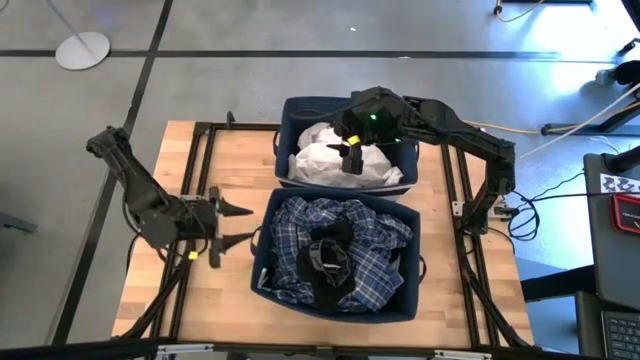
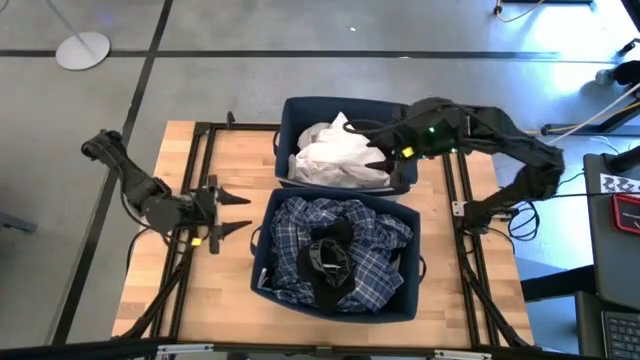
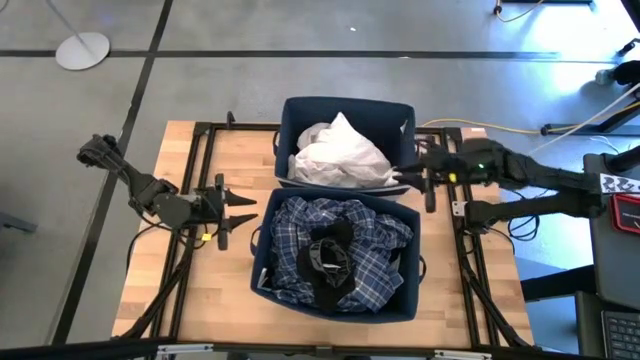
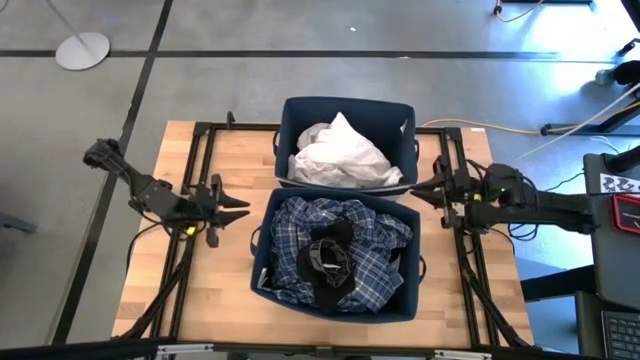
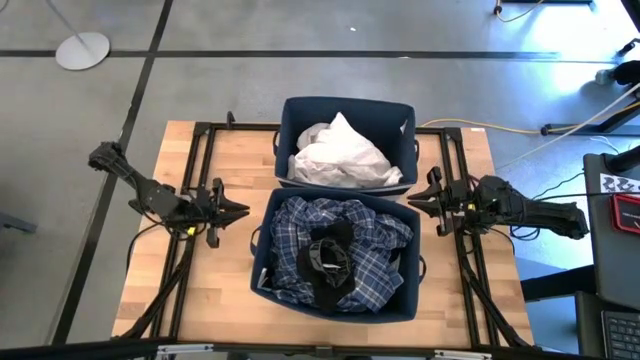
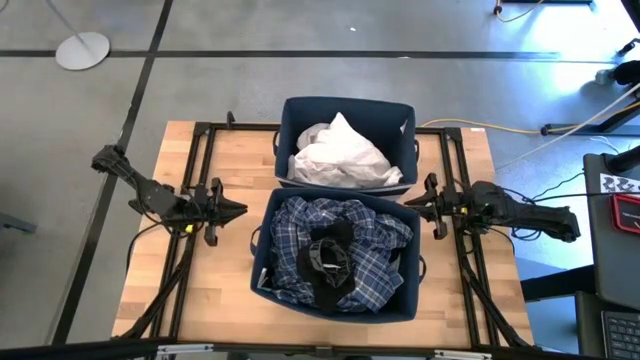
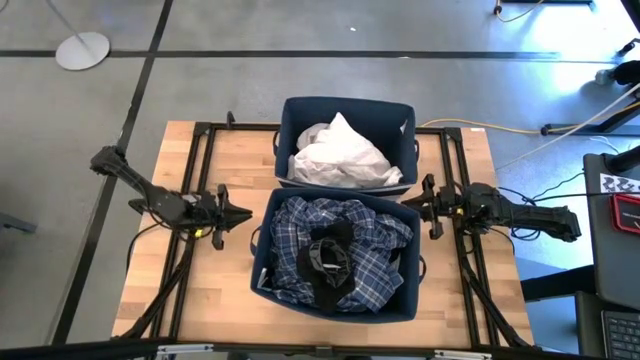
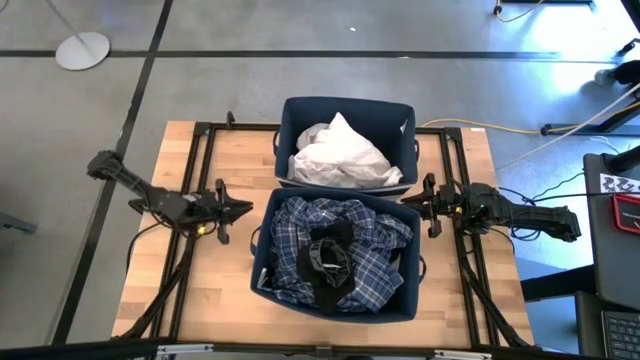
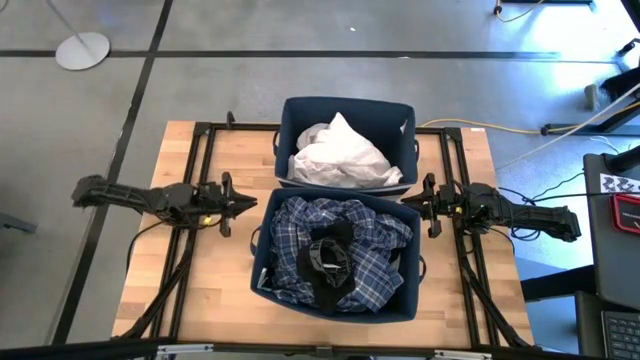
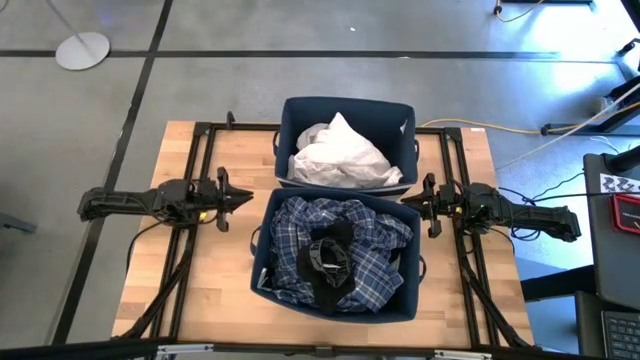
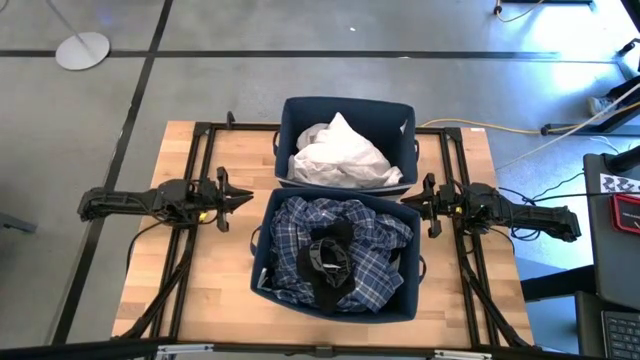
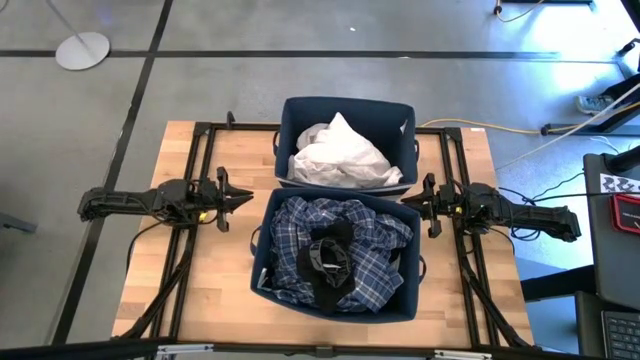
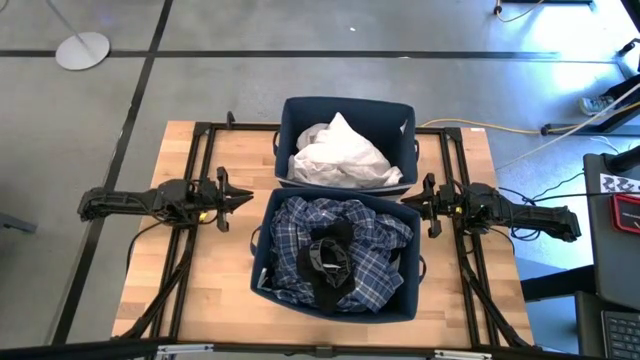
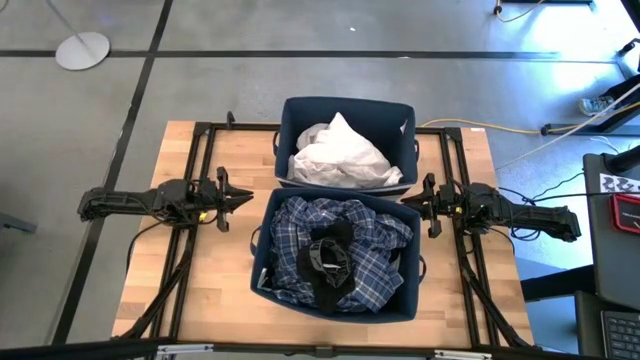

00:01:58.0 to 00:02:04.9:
Task: Sort clothes
Return to Home Position

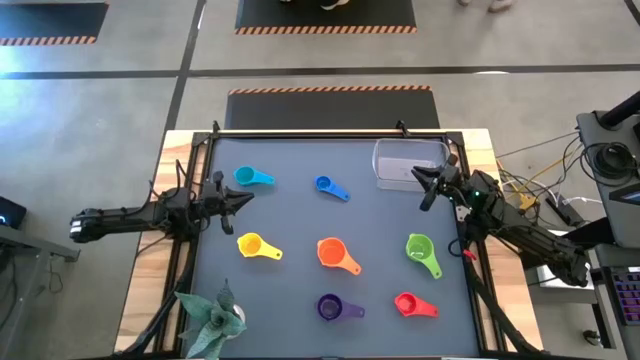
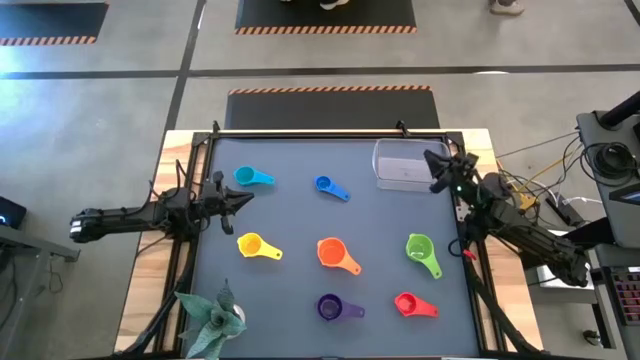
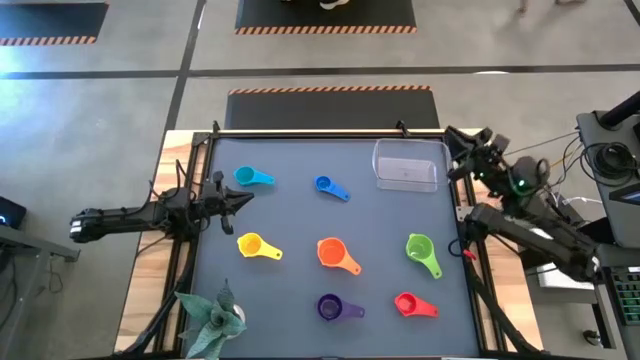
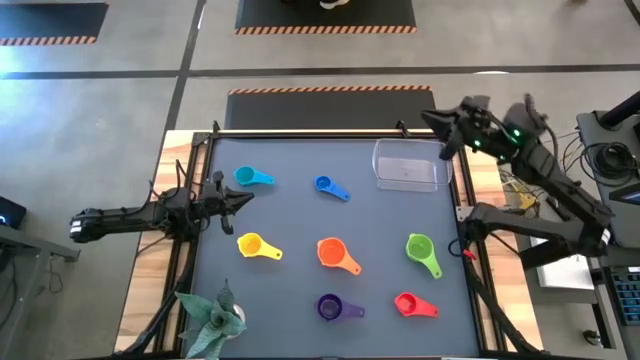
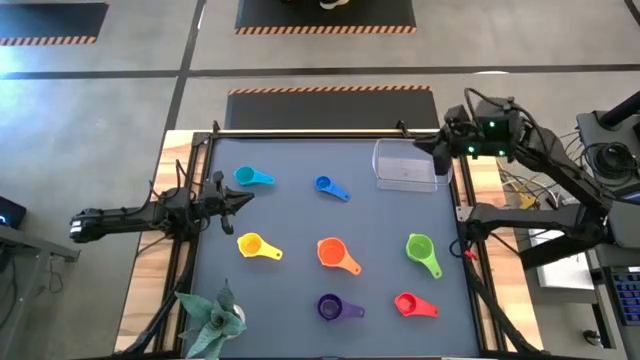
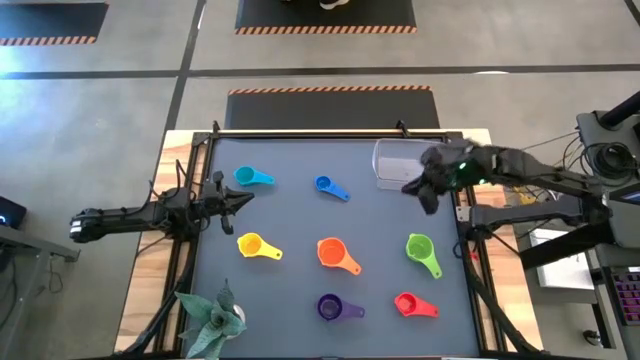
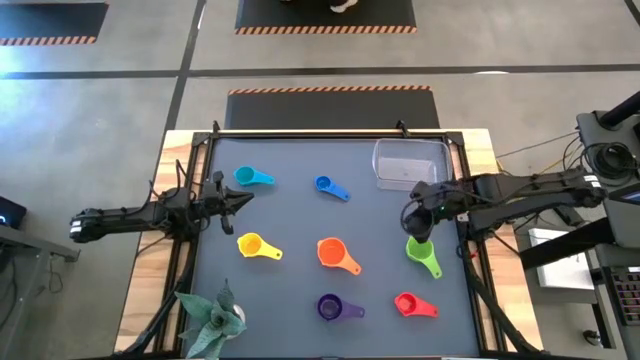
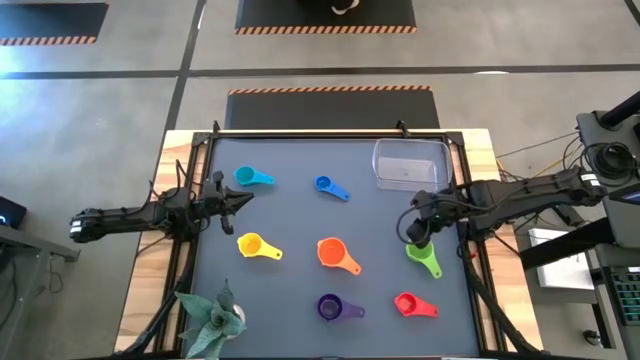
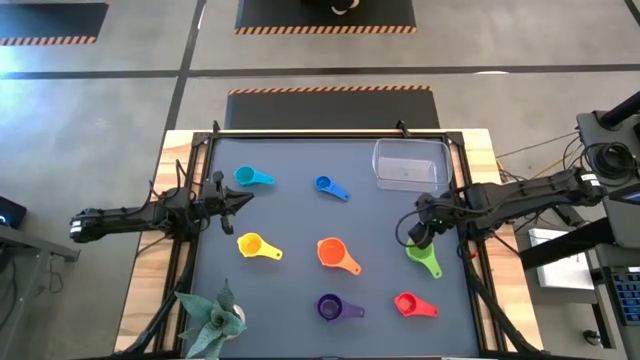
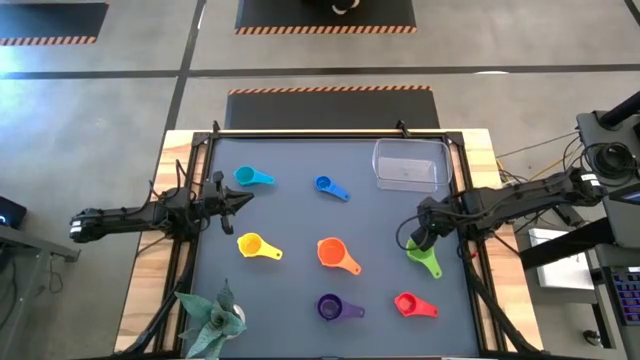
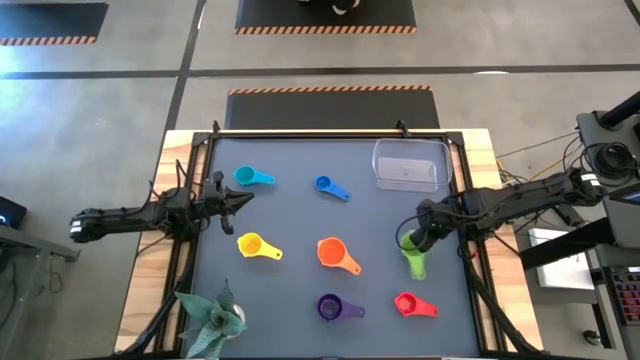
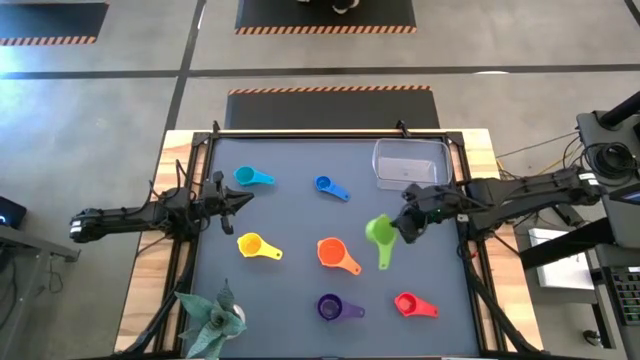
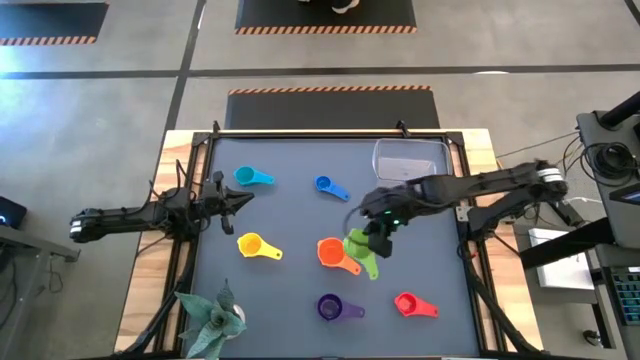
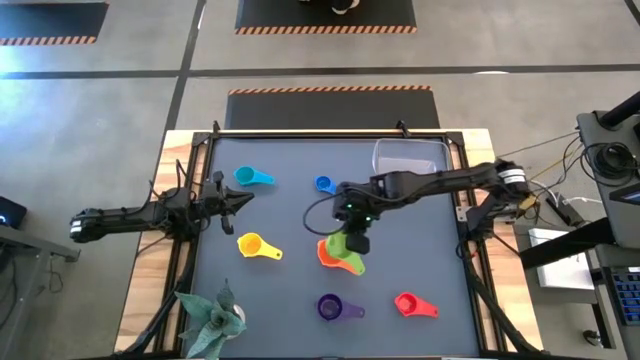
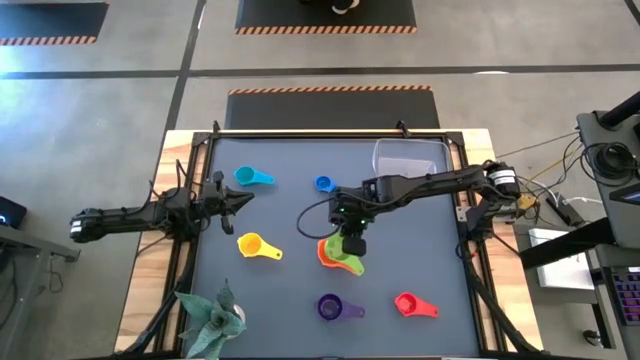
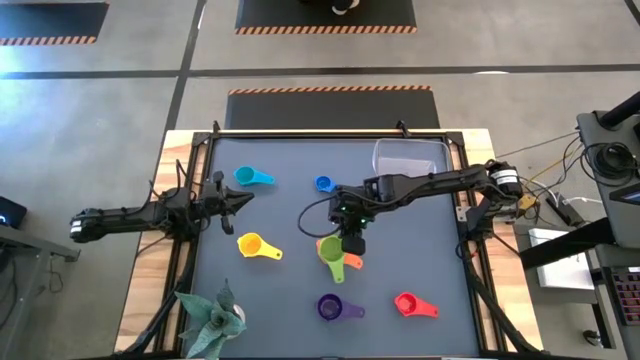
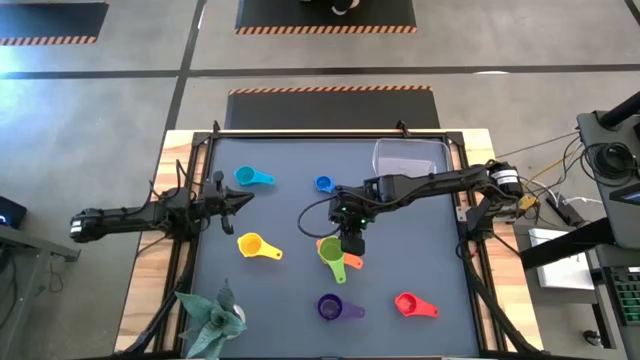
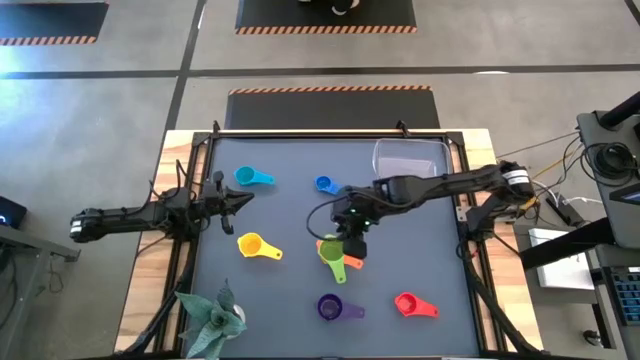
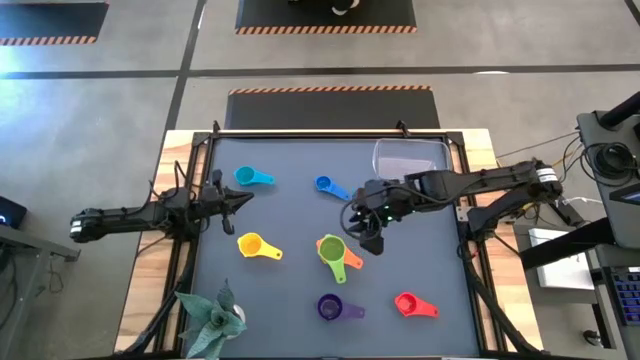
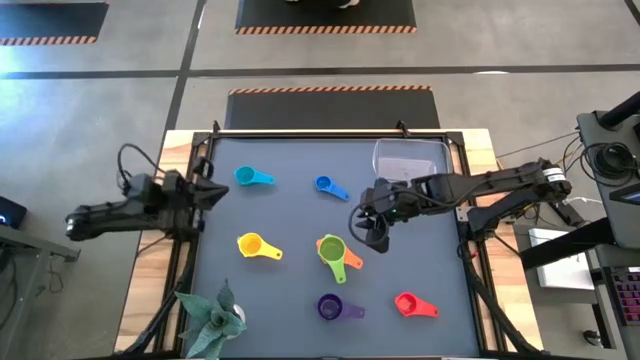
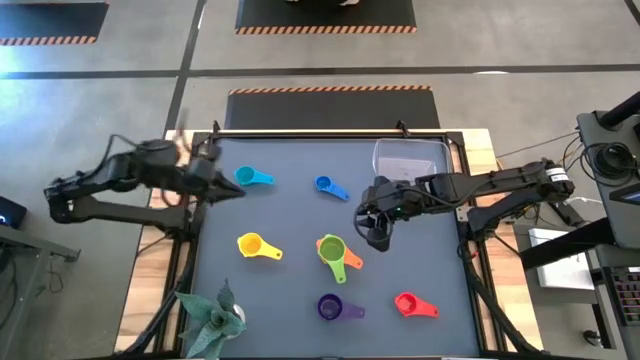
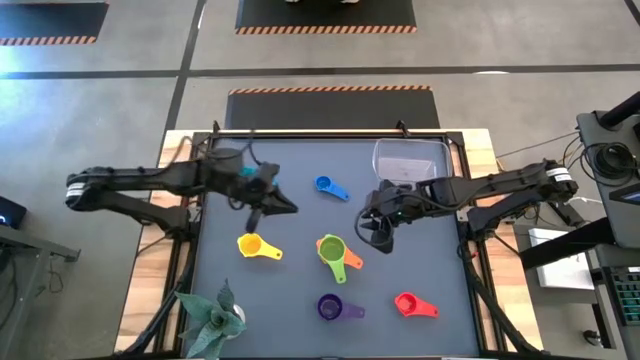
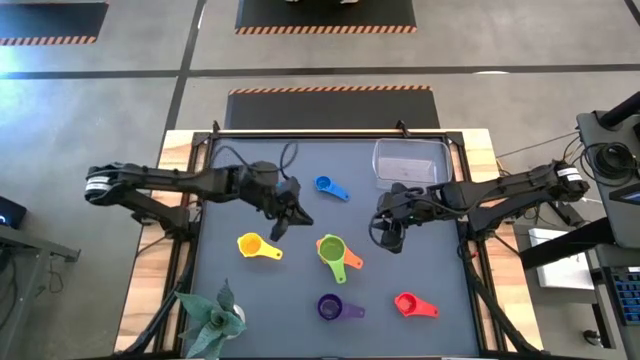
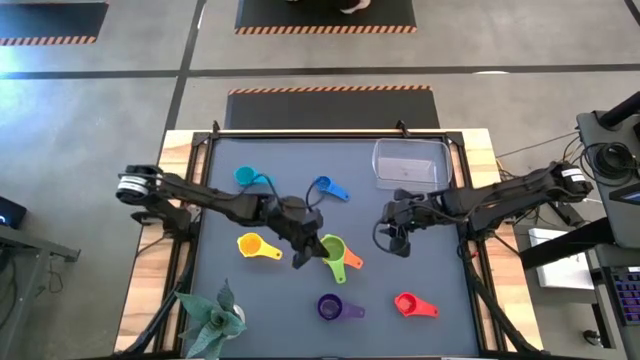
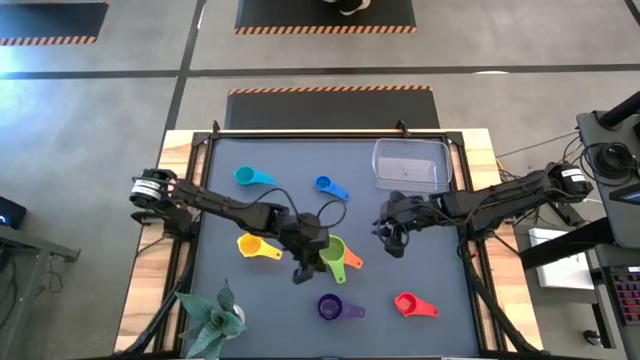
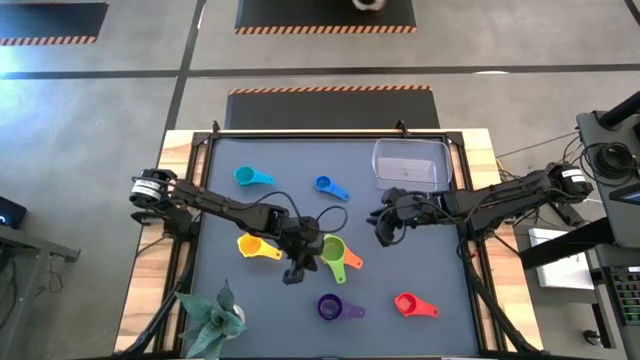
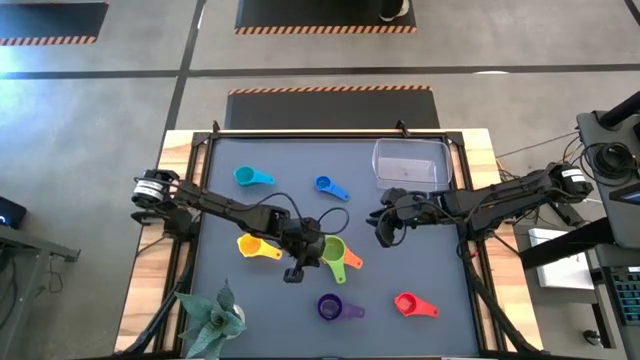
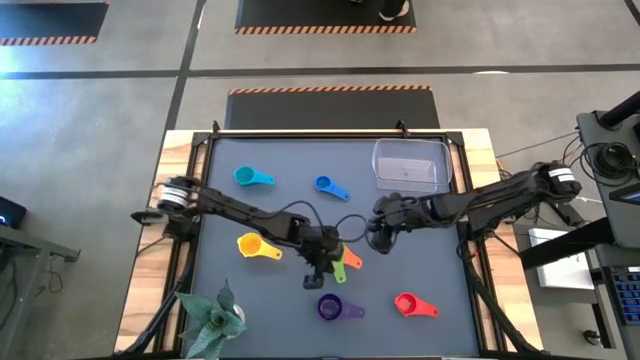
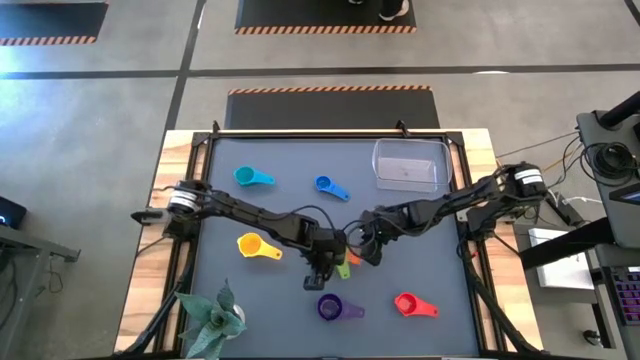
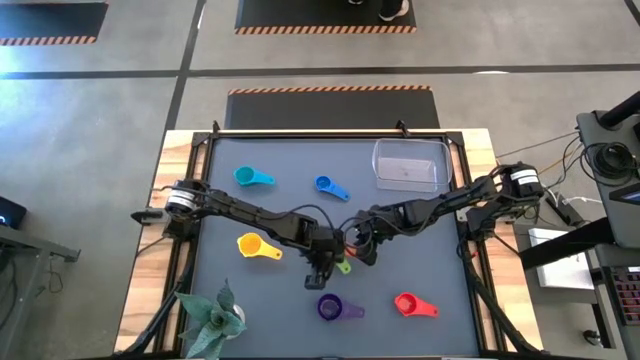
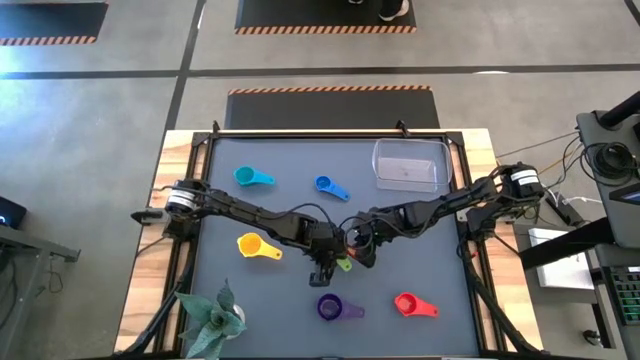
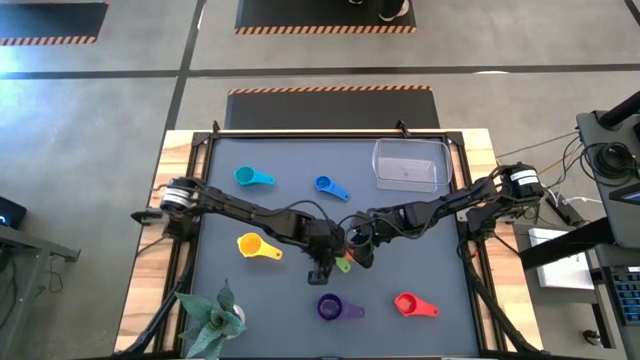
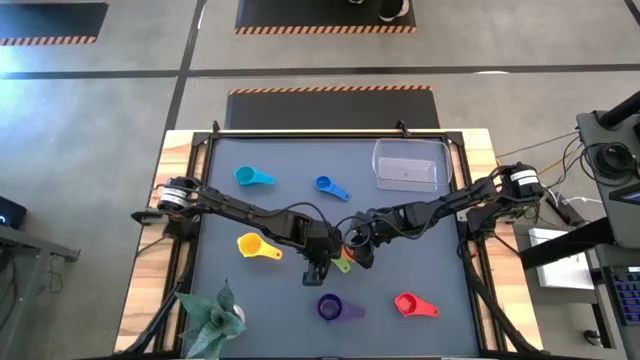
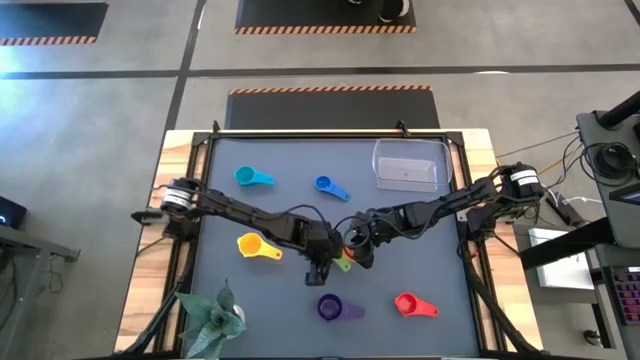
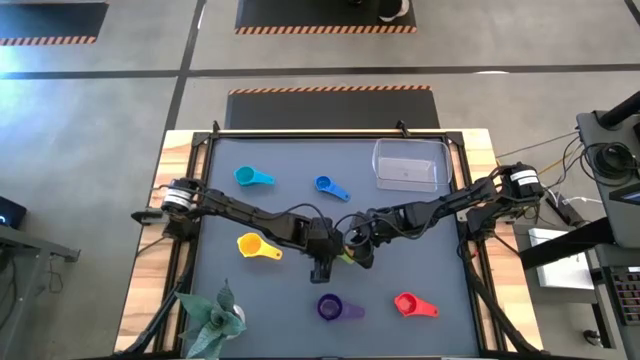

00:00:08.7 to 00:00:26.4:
Task: Nest measuring cups in basket
Stack the green measuring cup on top of the orange measuring cup
